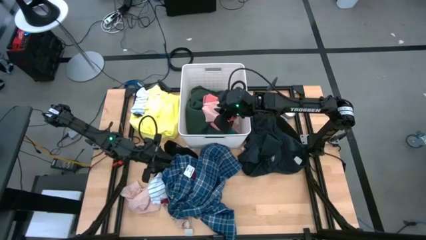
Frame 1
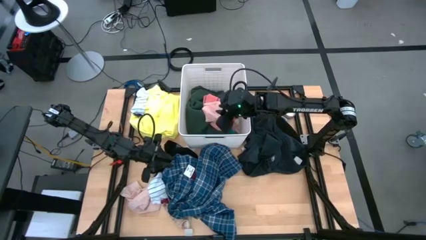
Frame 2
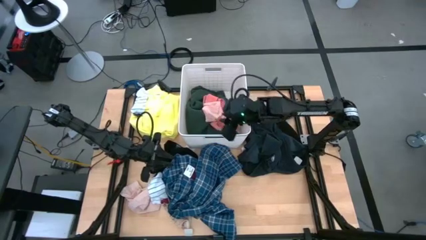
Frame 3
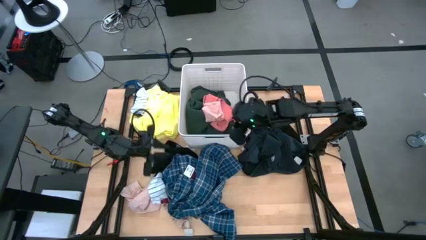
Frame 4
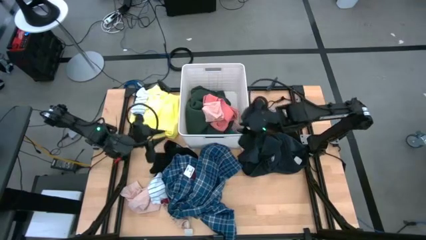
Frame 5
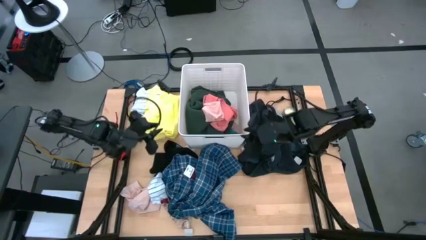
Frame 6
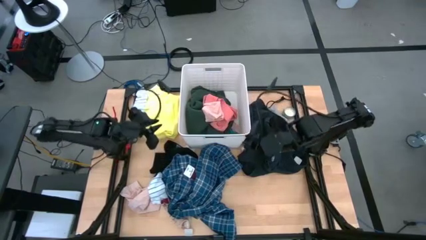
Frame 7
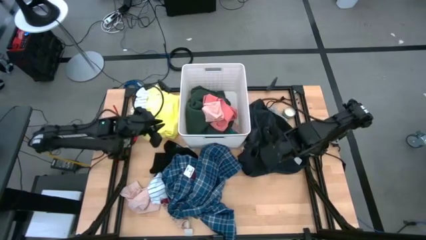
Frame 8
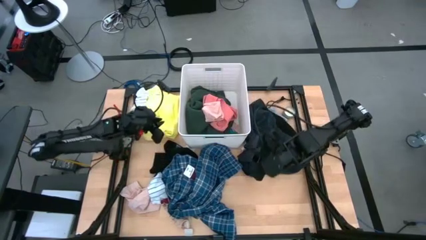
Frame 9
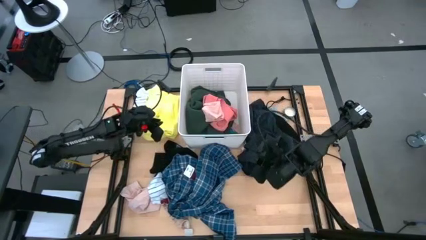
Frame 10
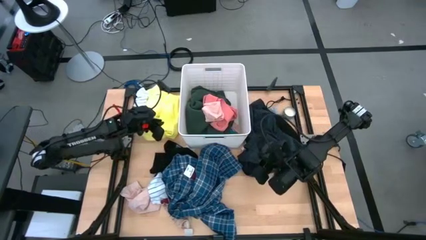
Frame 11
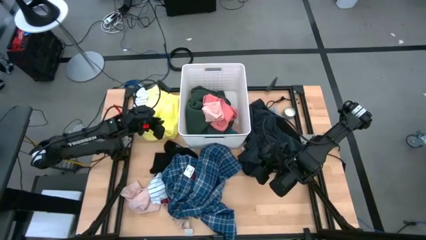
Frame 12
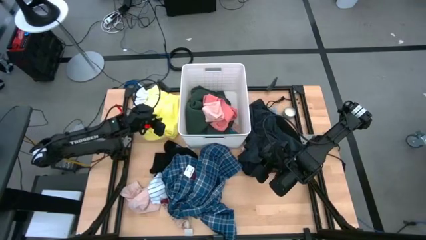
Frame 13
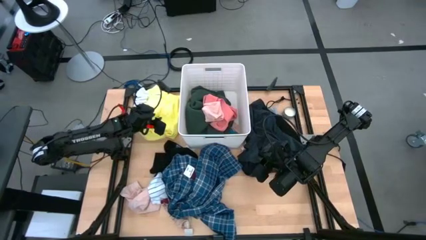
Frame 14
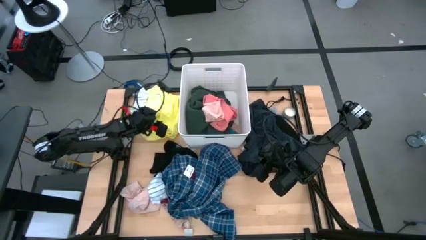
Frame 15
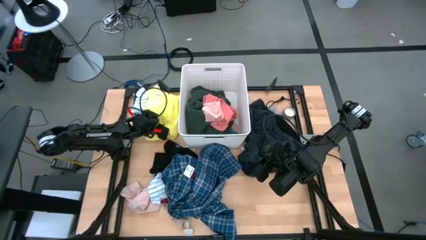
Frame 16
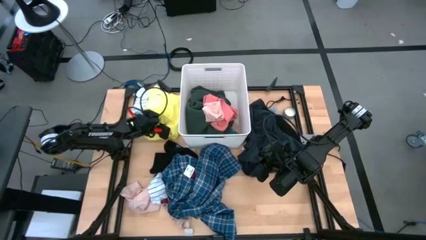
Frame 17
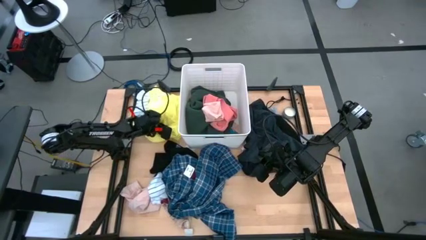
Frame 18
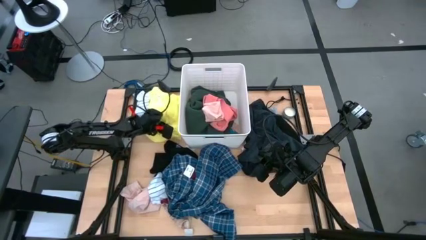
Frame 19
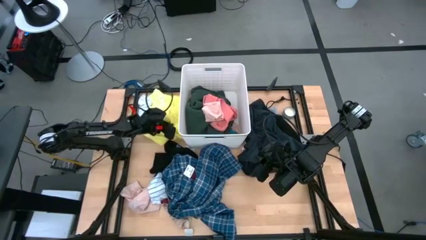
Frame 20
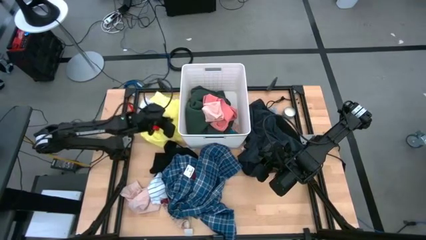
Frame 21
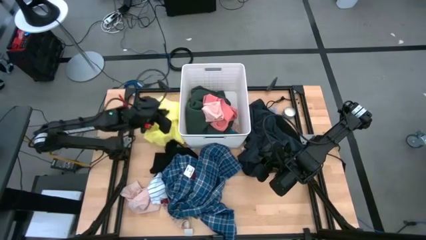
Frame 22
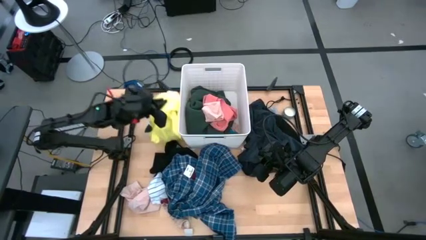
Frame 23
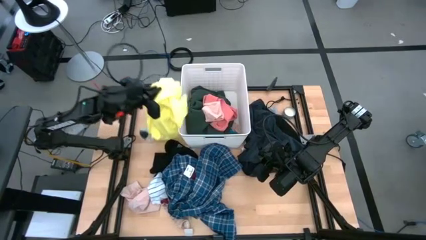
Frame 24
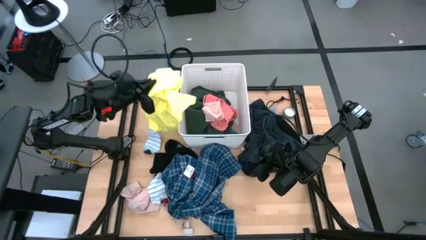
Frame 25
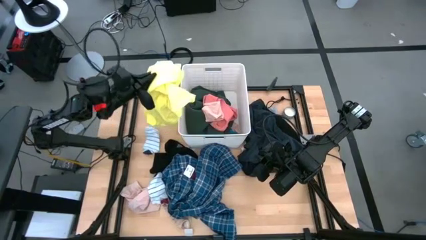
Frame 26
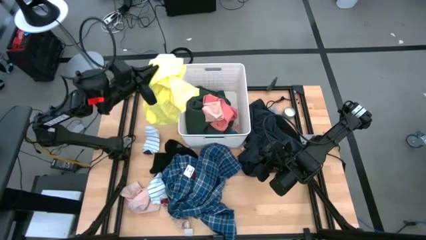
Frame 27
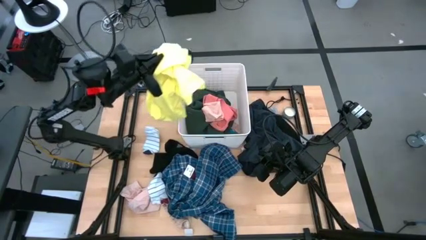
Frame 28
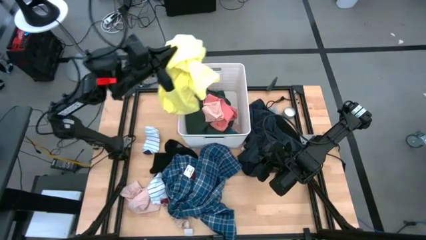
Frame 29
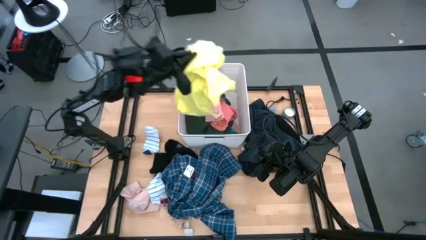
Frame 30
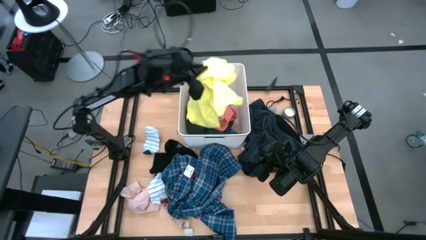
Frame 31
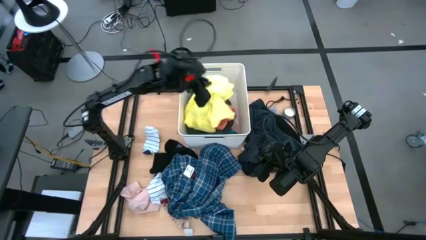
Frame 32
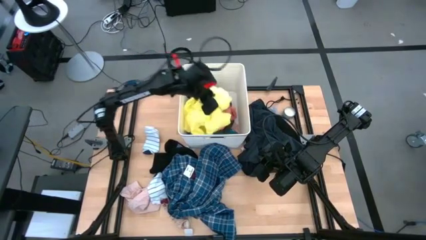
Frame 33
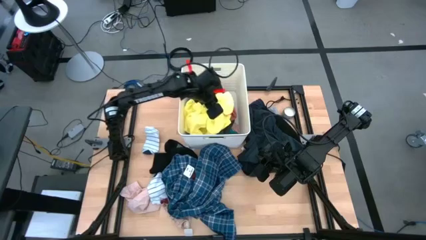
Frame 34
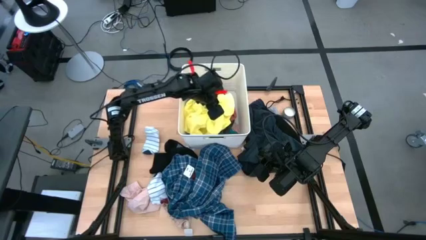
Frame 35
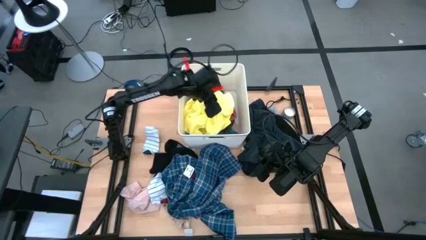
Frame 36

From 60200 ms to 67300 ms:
Task: Sort clothes
Put the yellow shirt into the laundry bin

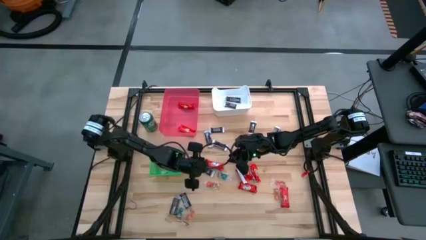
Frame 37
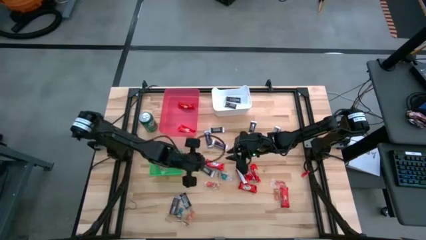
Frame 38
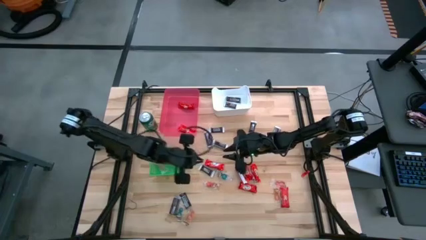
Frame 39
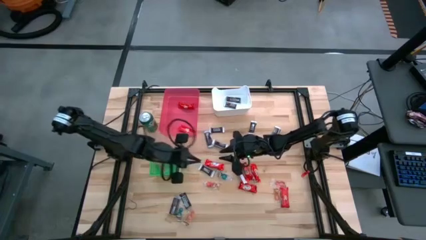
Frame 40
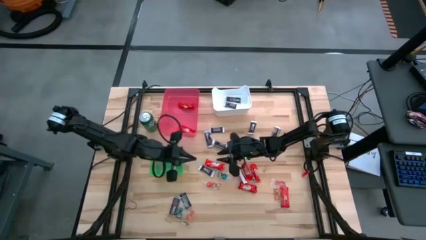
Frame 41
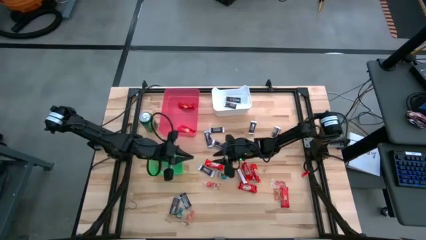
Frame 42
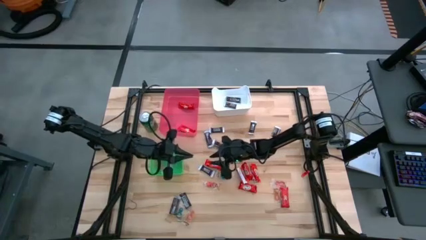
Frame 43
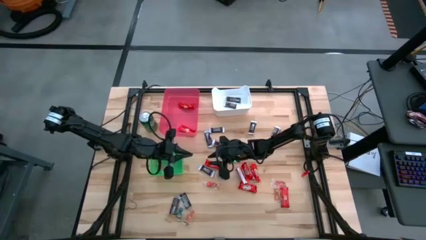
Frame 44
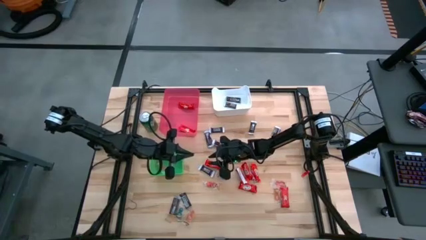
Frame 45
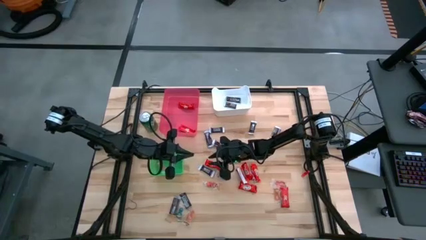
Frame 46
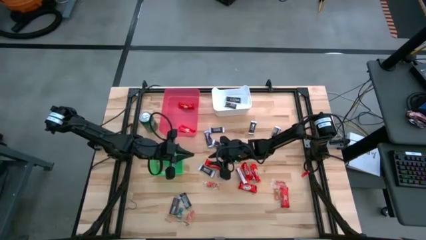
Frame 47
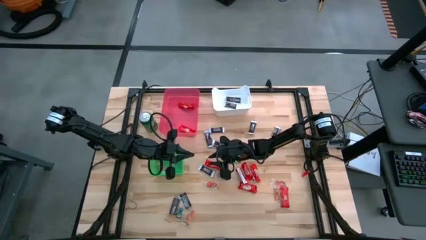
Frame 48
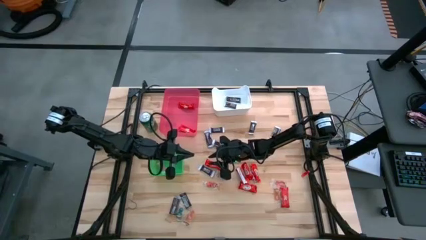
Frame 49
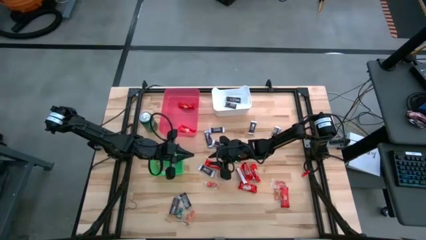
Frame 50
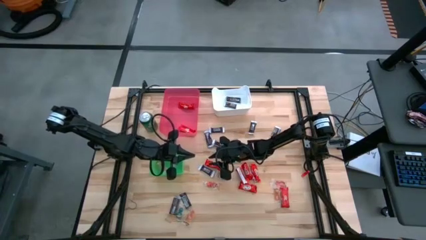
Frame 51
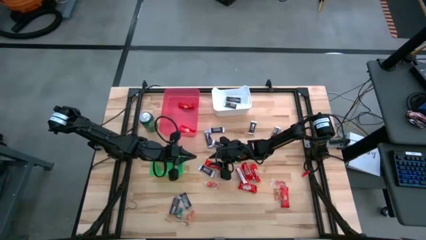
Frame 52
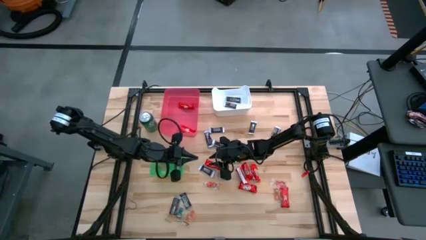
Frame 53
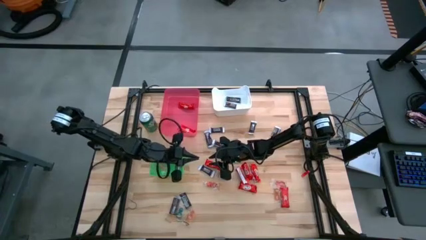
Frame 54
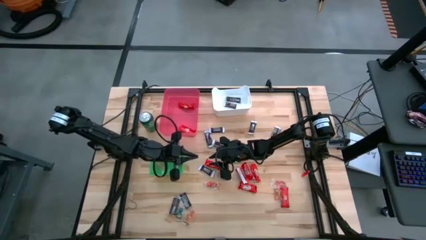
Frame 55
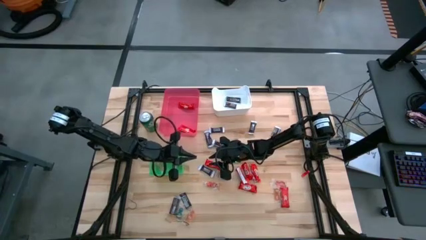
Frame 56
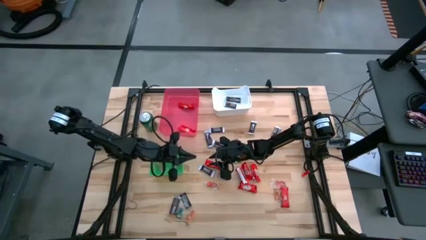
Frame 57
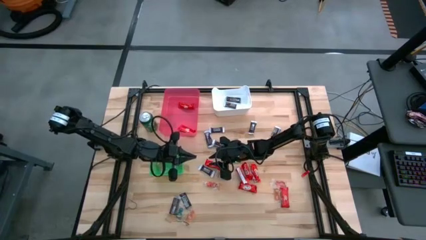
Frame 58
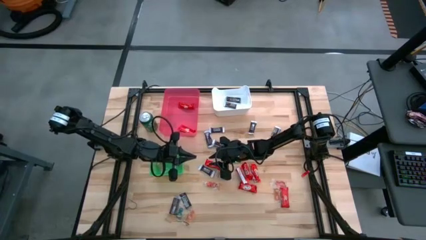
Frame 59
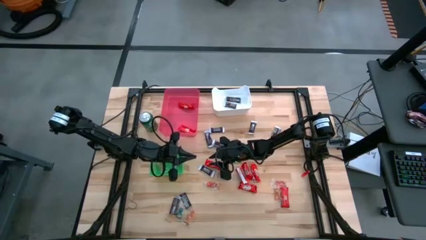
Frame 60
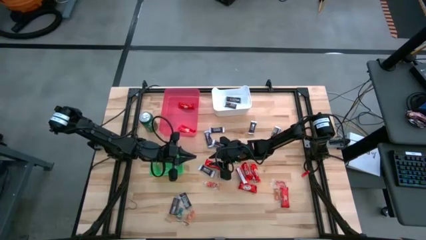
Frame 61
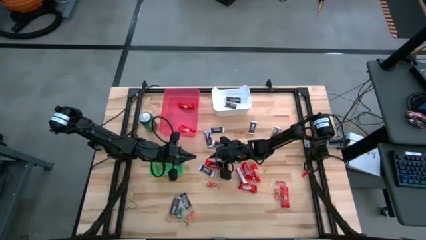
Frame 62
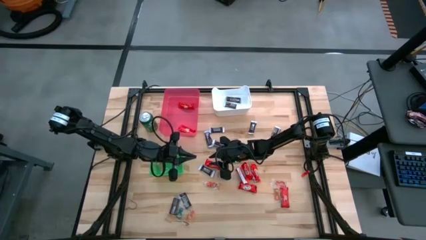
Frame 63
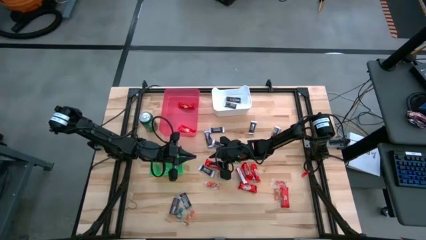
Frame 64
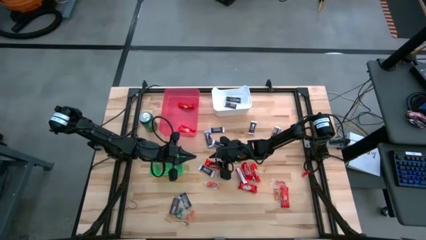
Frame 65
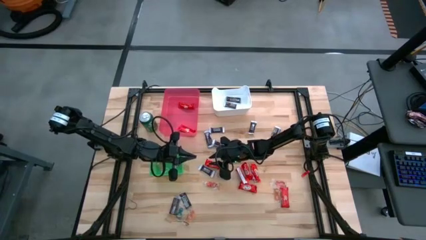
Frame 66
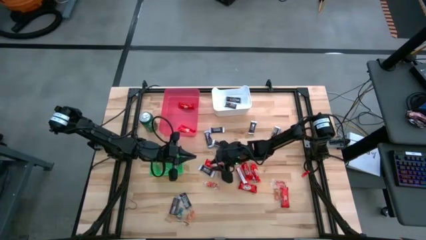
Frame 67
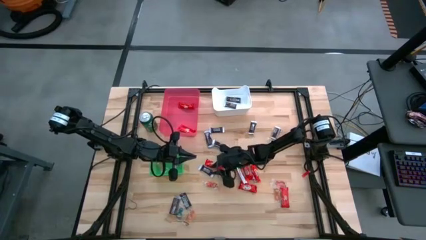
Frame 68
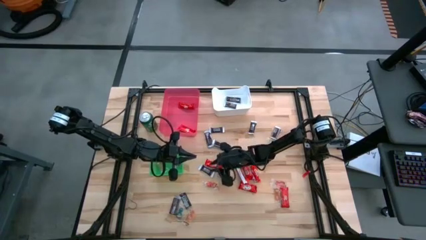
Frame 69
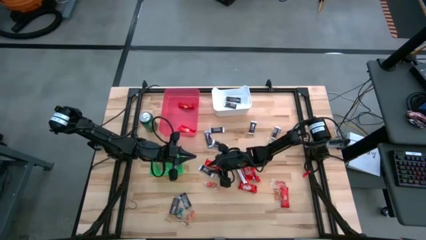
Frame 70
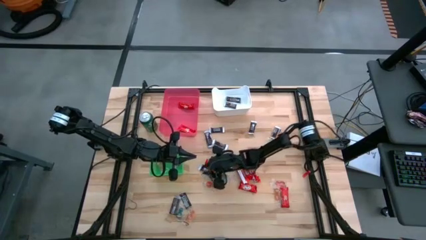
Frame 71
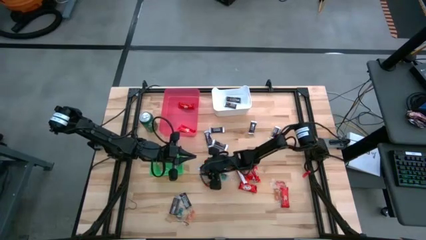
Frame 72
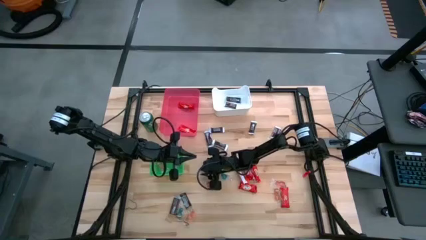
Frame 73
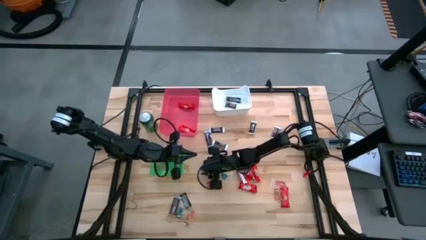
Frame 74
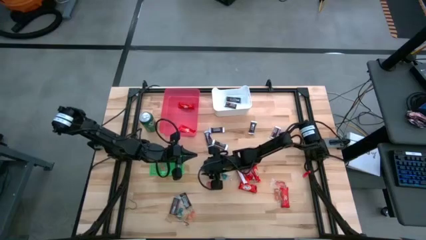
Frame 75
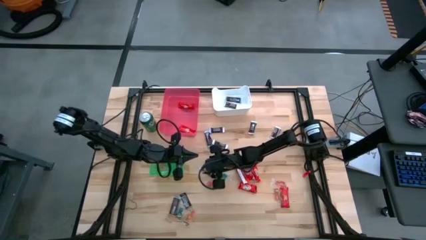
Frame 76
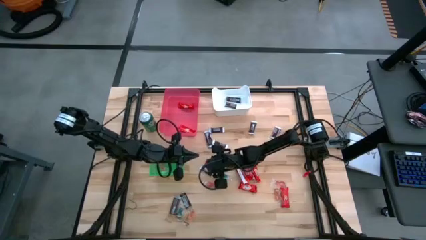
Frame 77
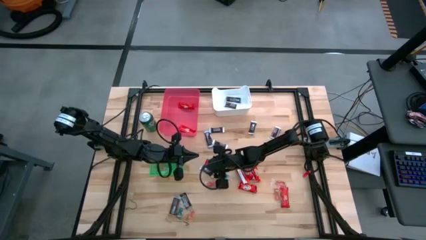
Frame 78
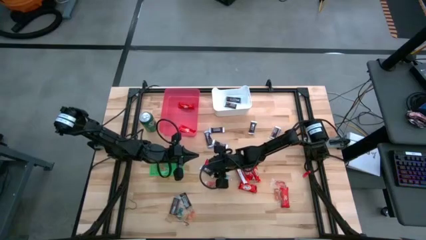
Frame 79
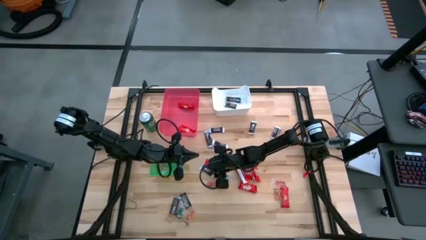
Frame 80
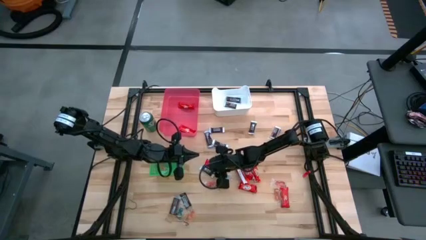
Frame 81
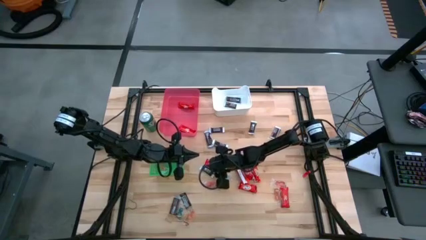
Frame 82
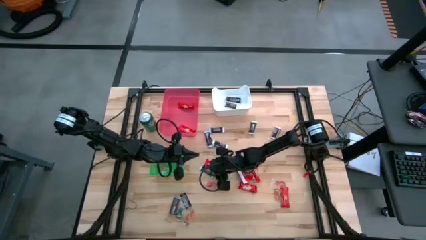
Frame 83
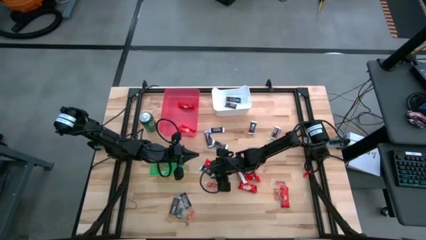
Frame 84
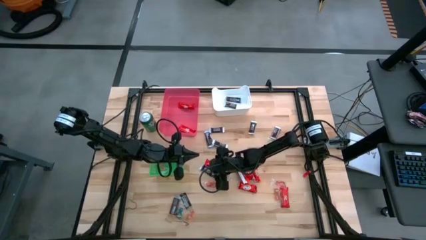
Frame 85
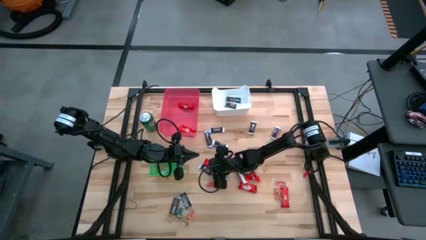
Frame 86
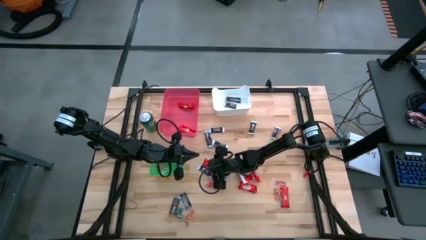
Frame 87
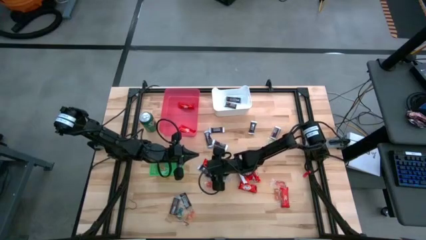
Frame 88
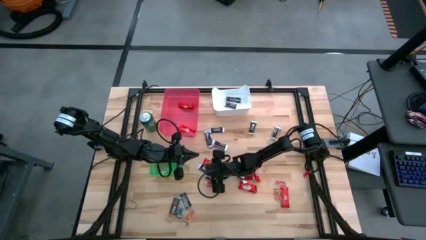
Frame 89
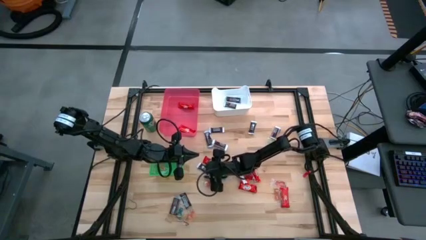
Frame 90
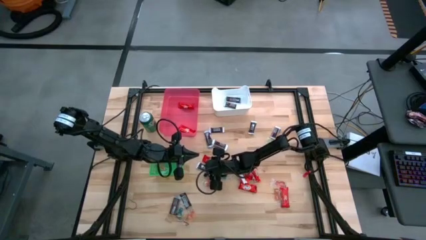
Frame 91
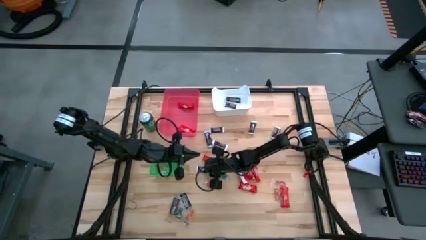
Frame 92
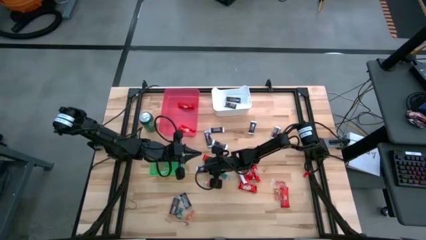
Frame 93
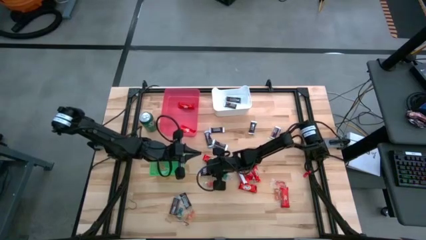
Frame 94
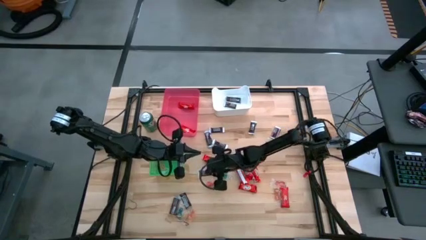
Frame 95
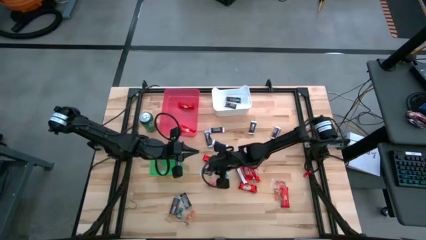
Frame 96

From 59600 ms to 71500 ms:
Task: Organize candy in baskets
Put the brown chocolate into the white bin
